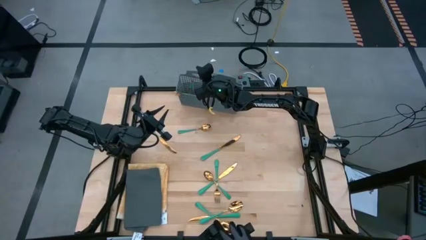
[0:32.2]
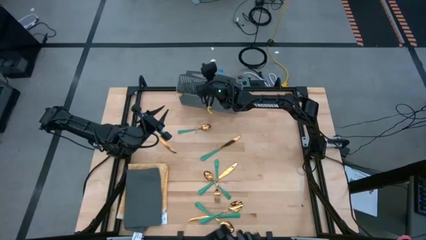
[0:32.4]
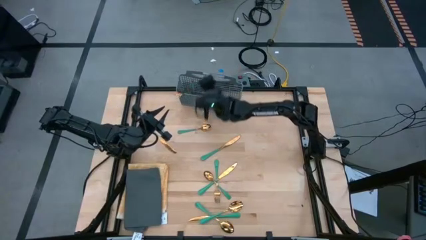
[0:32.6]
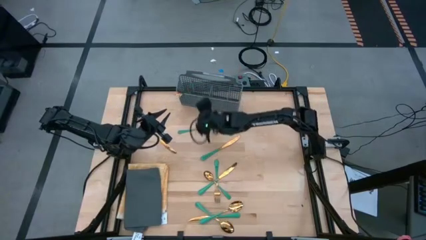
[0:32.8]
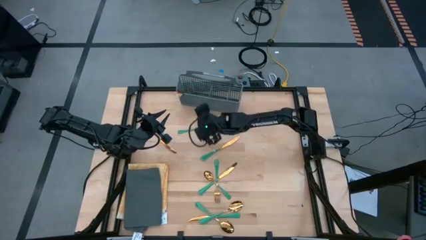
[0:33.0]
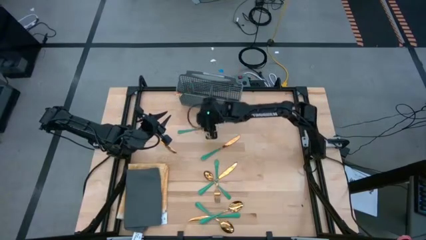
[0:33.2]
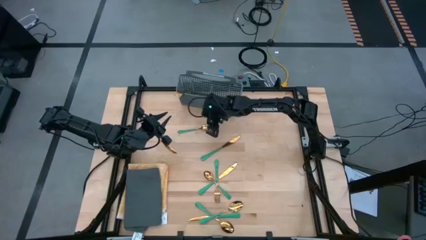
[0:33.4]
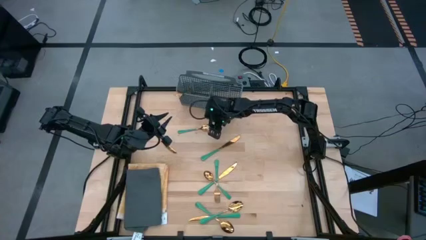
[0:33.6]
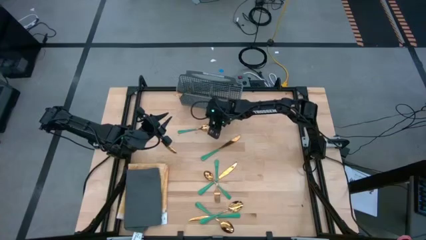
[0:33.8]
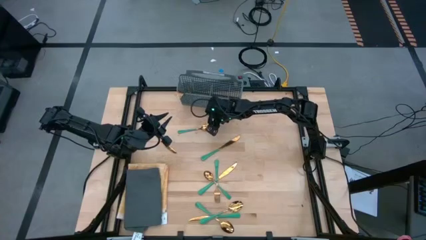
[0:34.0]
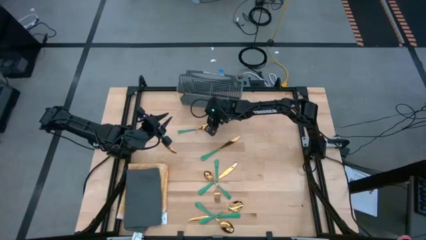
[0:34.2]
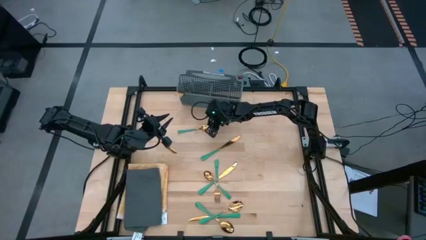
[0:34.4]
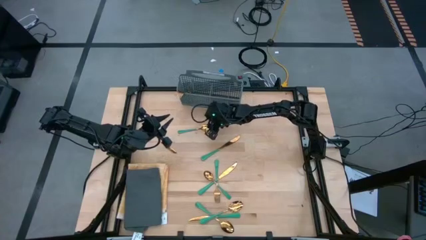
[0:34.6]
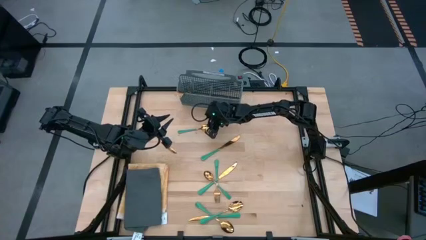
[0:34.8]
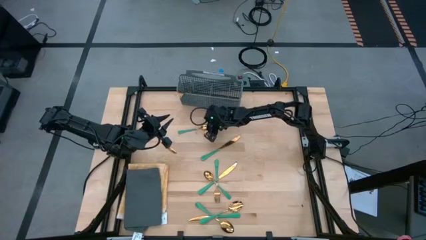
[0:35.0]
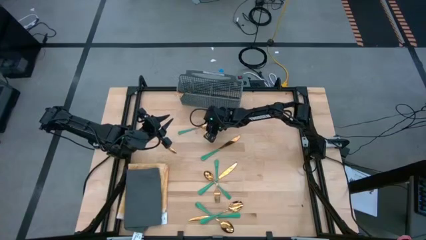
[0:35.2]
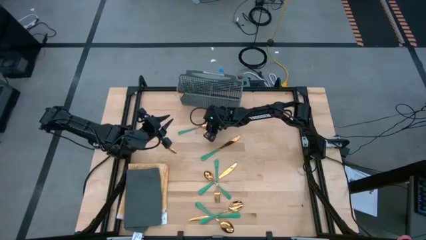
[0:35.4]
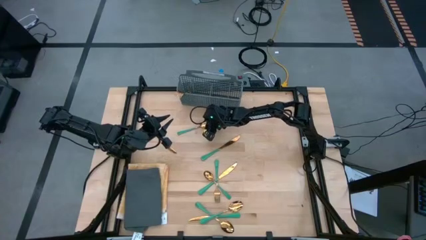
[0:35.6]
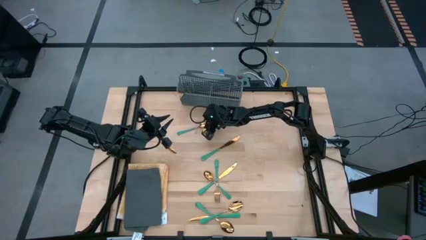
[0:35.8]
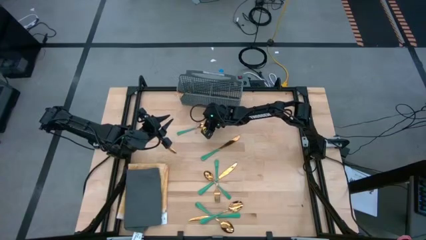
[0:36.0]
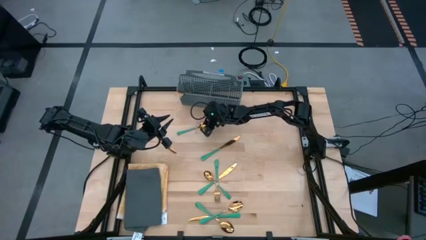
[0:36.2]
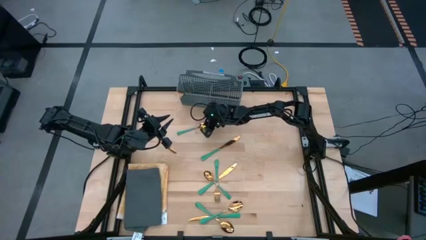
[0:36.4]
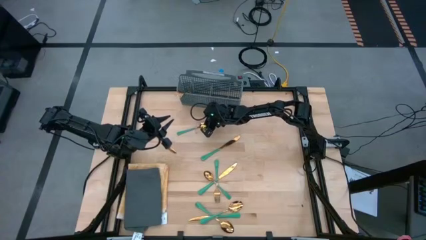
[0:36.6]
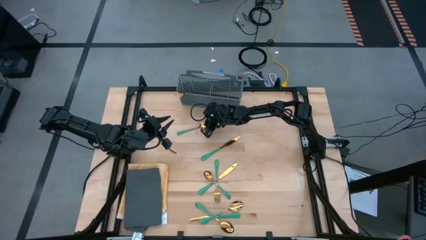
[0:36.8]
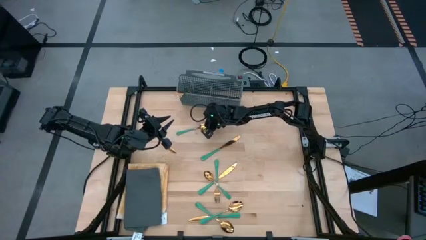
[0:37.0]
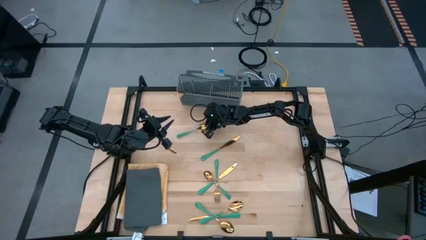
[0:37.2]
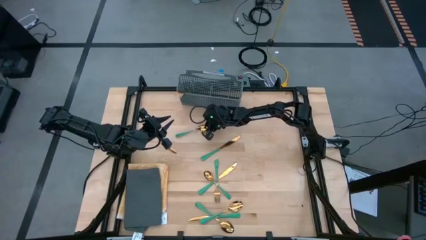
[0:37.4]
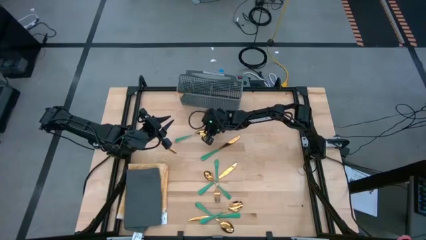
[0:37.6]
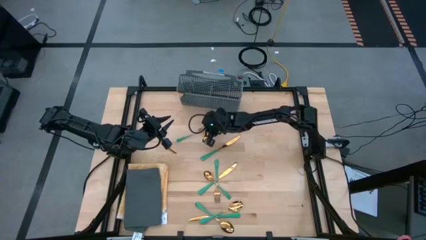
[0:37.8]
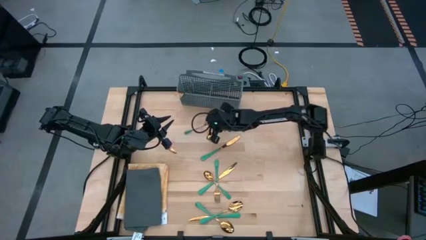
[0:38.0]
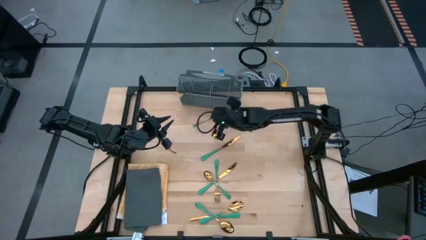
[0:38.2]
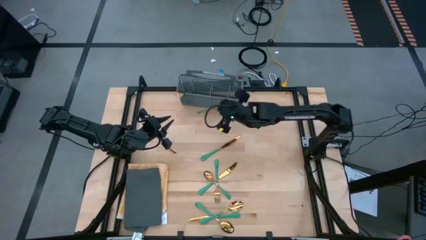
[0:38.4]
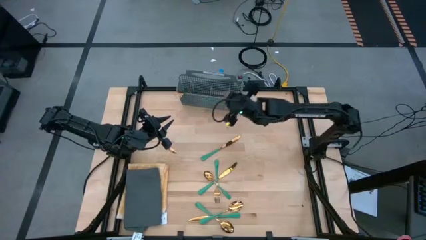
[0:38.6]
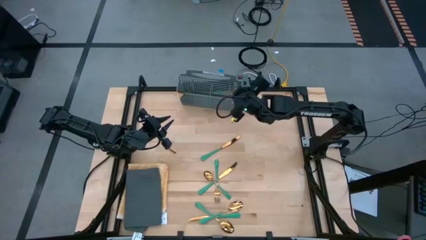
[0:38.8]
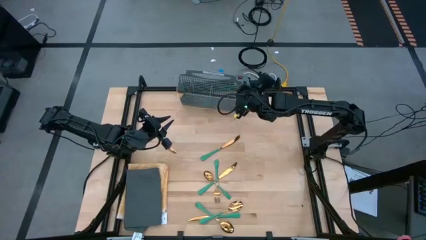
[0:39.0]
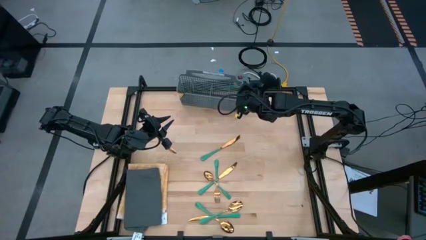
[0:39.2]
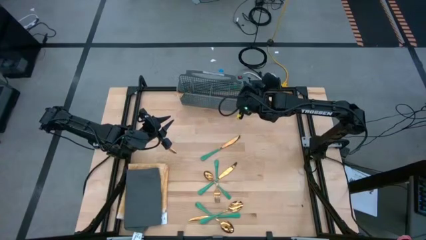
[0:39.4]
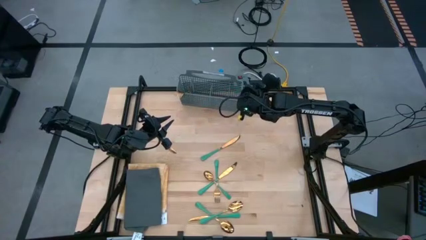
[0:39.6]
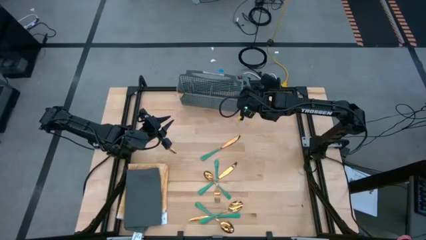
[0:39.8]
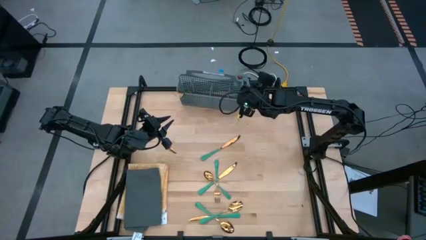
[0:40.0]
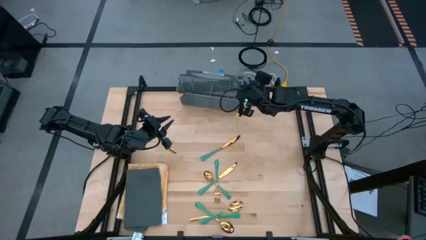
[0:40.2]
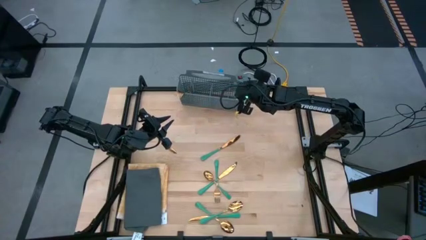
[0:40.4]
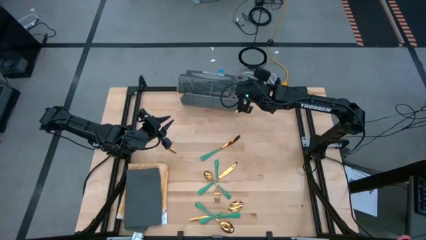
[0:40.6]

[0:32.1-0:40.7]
Task: Sort silverware
Put the green spoon into the gray silverware basket

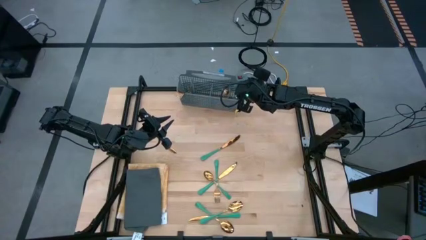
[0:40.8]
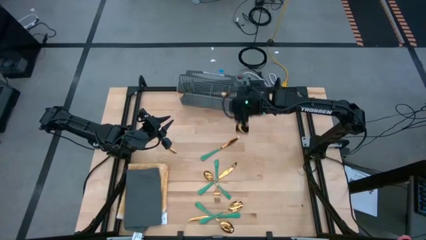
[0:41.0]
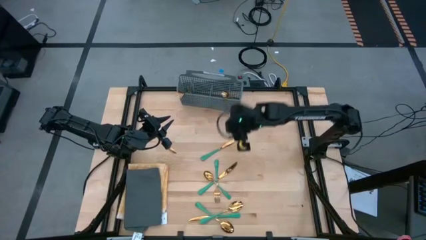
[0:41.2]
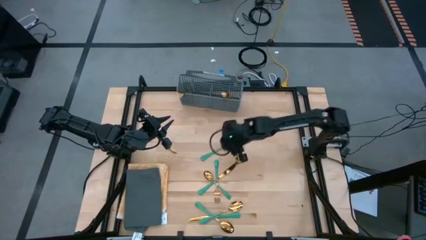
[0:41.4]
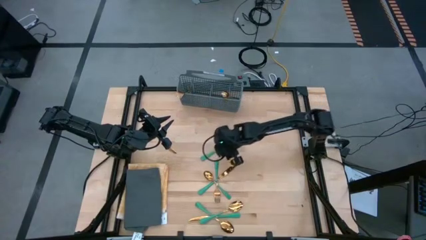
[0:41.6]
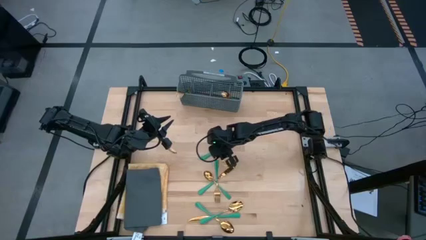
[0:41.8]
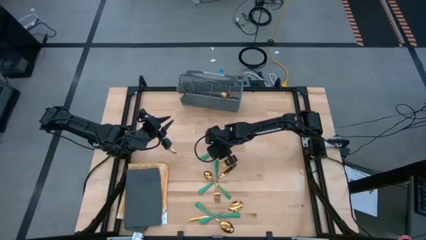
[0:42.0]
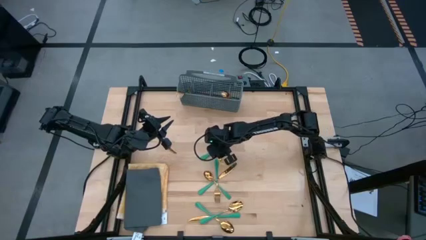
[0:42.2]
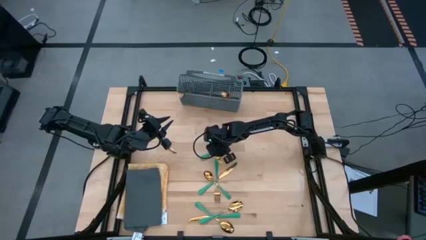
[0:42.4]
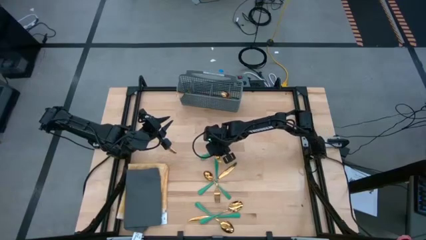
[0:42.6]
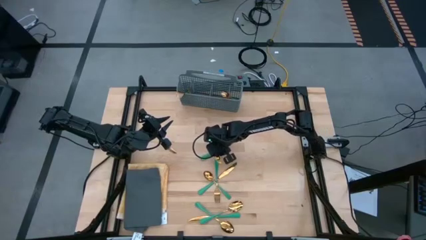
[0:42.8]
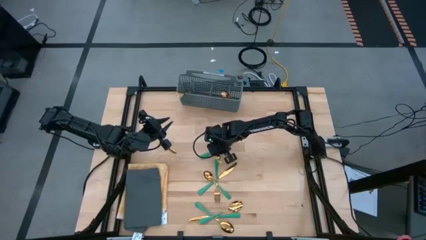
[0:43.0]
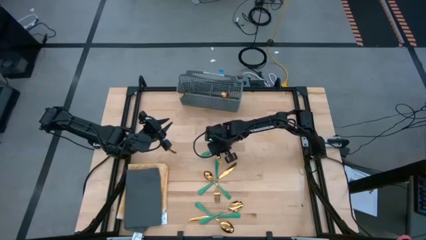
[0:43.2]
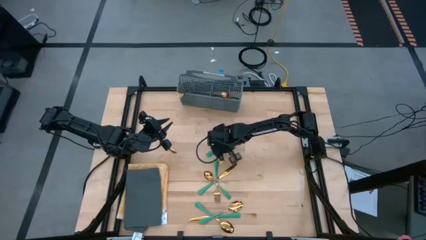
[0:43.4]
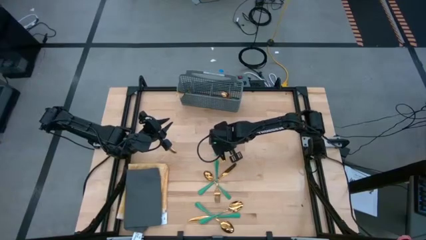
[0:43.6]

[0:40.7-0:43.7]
Put the green table knife into the gray silverware basket

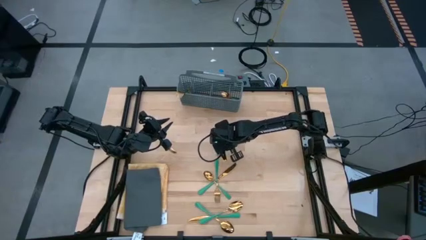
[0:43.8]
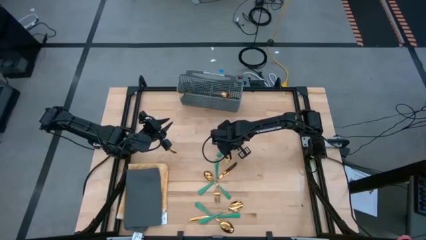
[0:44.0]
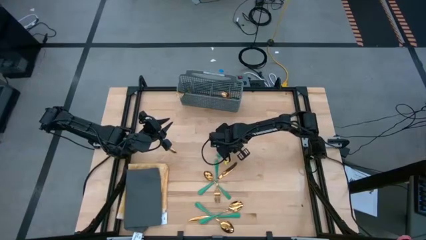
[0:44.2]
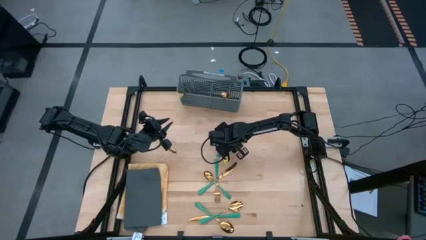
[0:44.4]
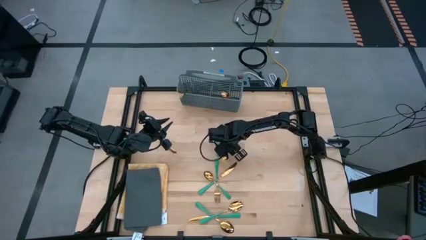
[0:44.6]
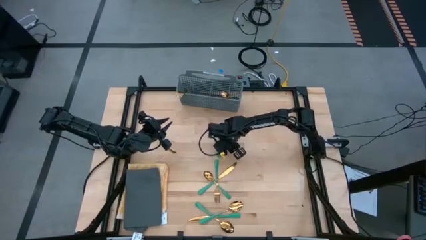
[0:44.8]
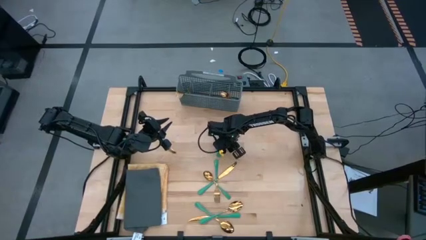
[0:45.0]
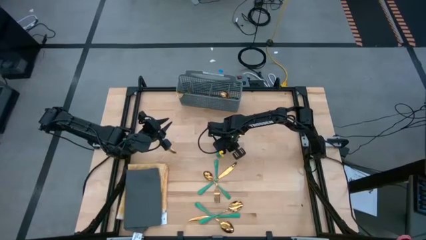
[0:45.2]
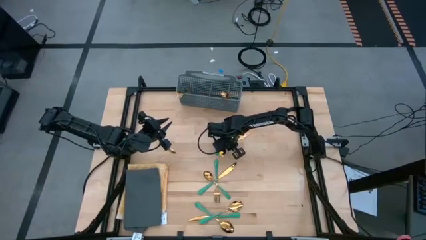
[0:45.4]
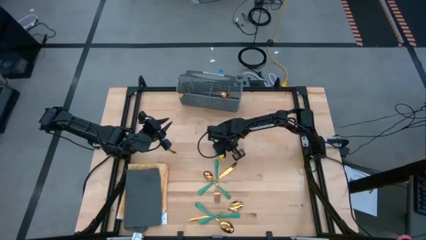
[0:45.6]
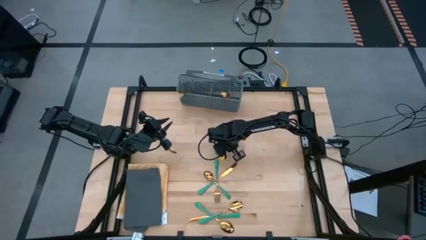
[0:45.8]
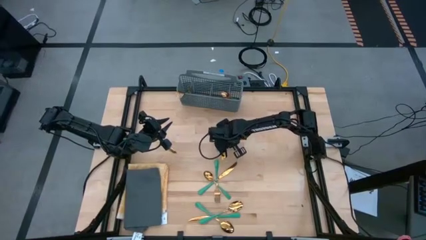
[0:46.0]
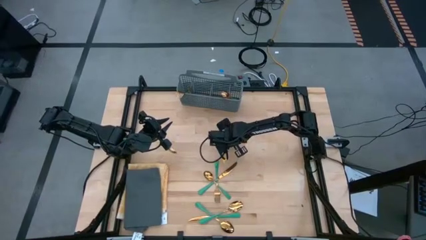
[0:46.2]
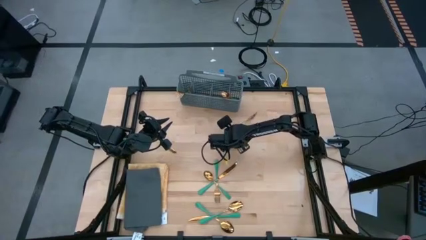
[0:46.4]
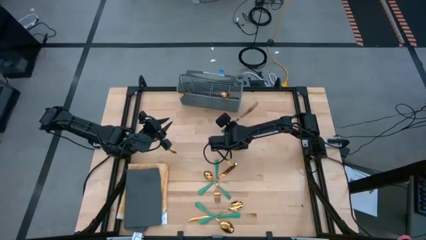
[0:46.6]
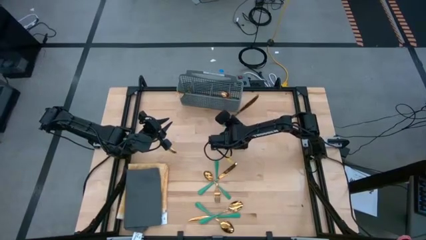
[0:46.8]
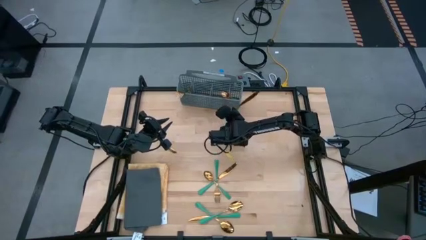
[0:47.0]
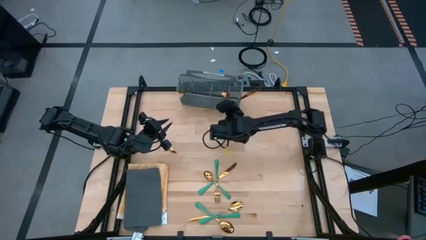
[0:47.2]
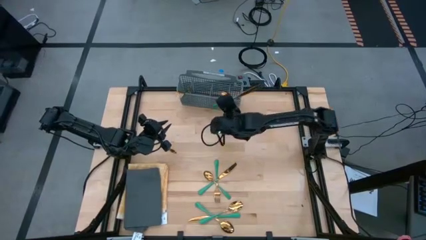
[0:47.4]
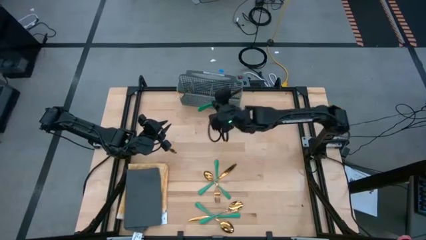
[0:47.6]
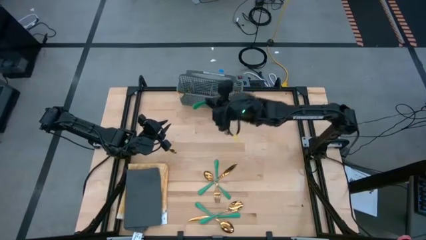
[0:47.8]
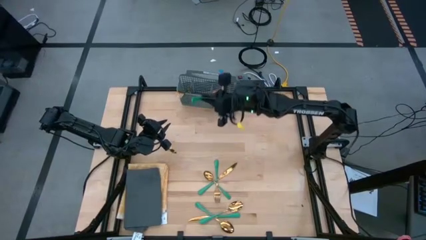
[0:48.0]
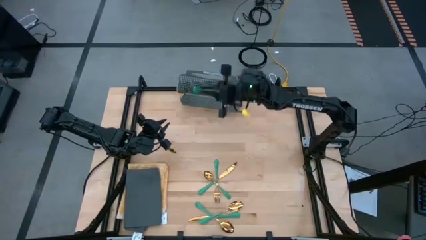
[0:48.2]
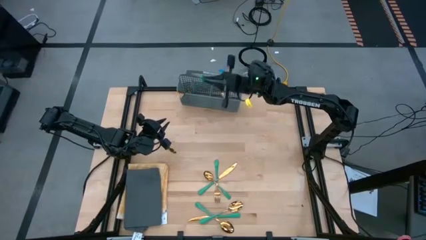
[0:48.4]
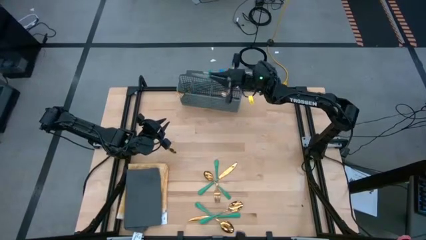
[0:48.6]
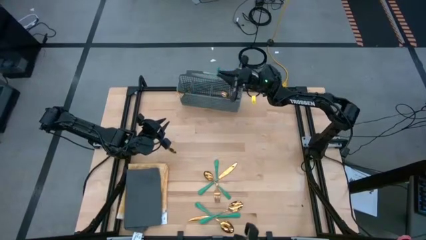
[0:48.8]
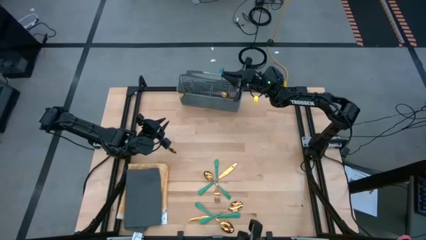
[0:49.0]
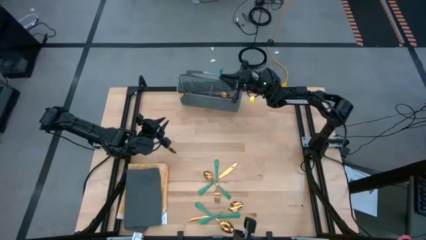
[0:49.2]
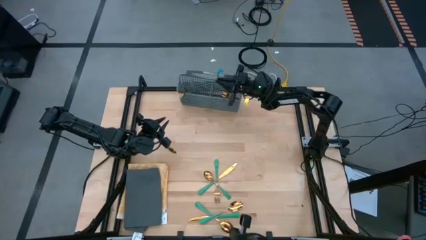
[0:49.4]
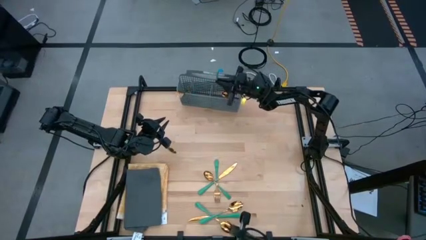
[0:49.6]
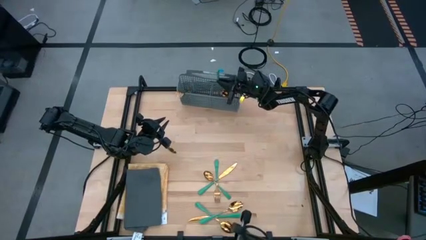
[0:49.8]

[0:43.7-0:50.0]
Put the green table knife into the gray silverware basket
